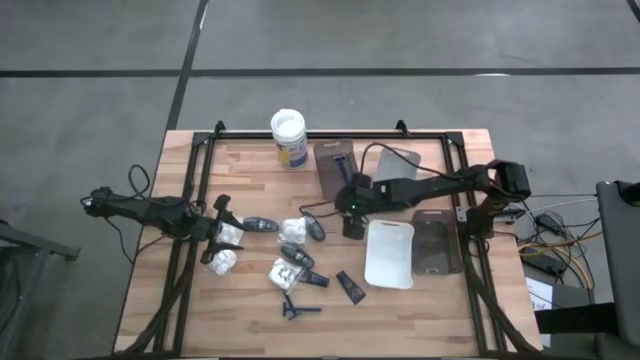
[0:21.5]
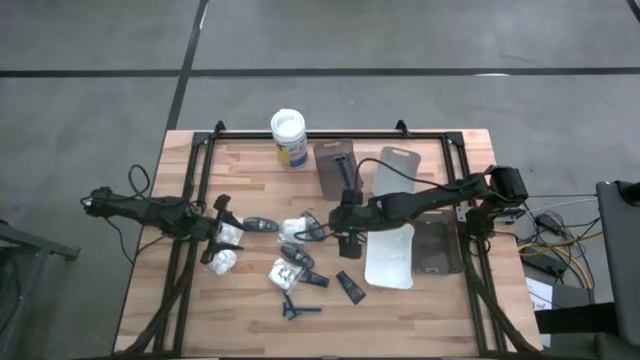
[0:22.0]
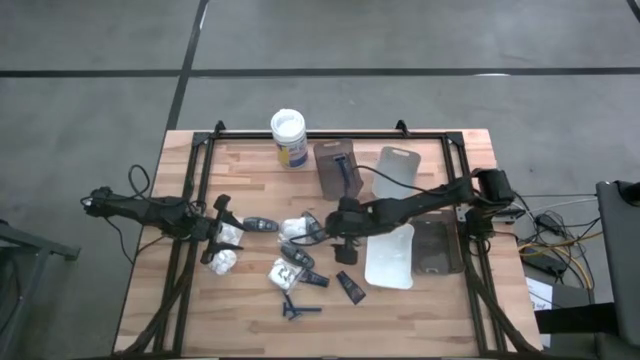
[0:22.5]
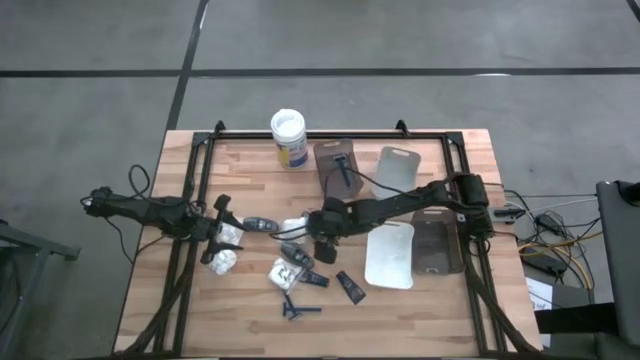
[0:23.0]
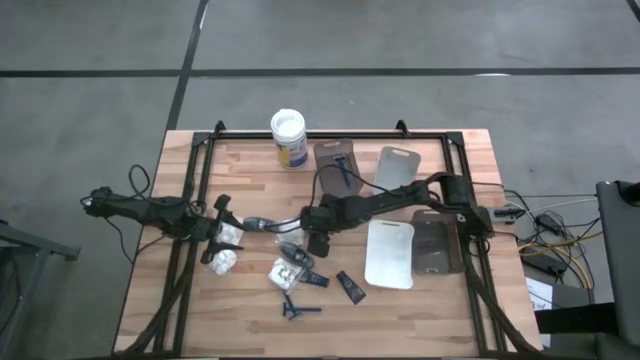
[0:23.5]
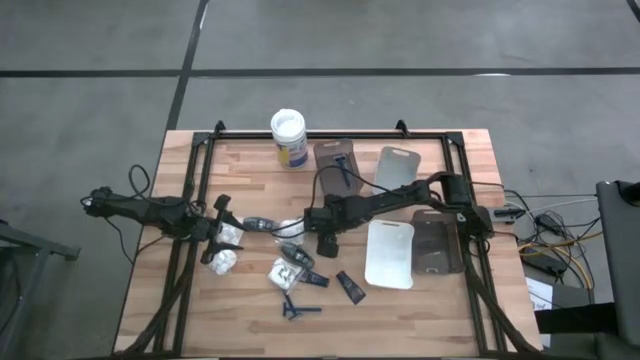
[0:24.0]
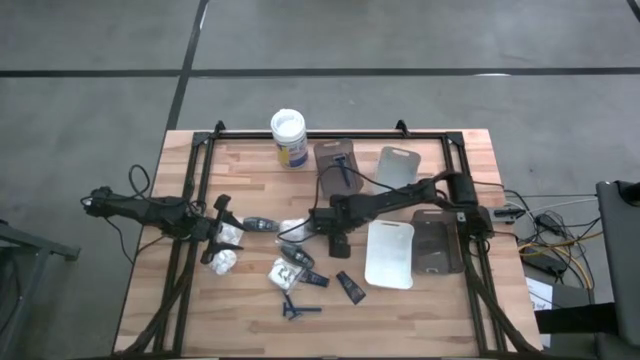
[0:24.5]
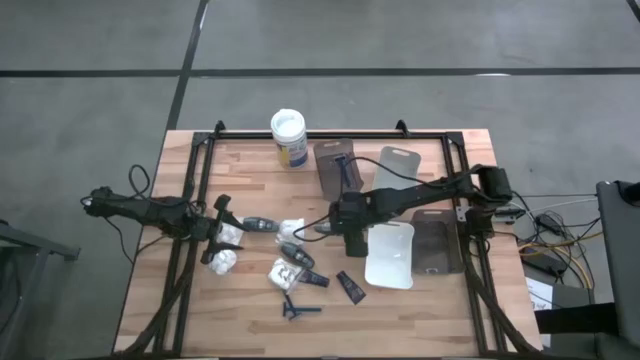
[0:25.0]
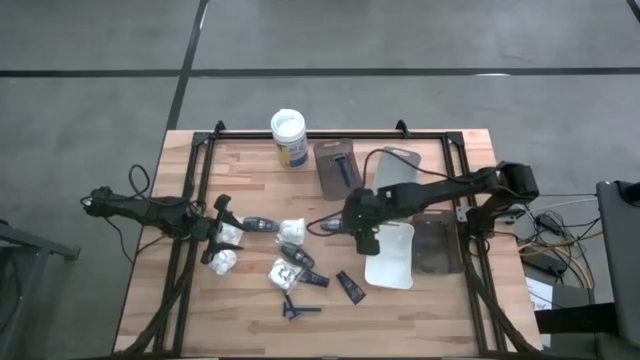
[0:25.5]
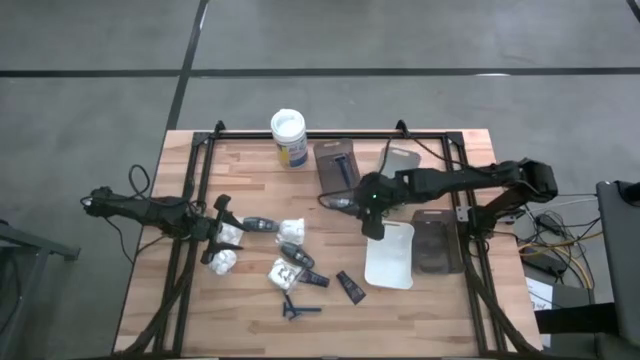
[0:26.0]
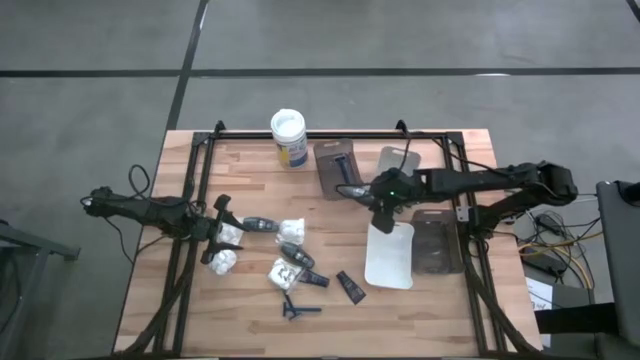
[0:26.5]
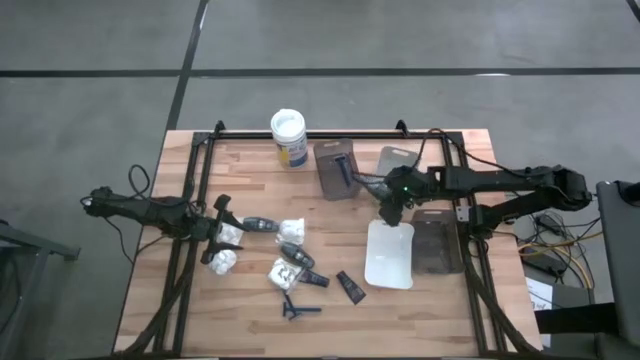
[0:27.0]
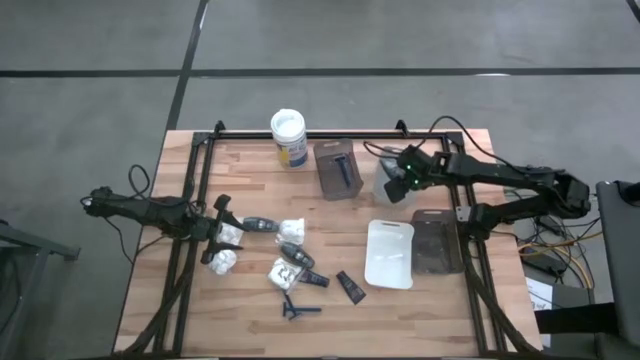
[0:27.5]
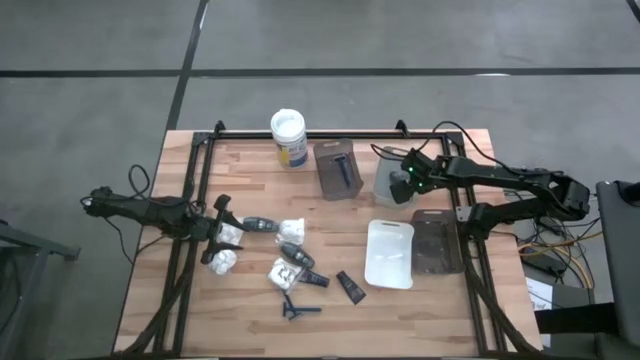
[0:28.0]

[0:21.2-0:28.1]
Task: Pick & Place Travel size toiletries
Put the gray deodorant into the gray bin

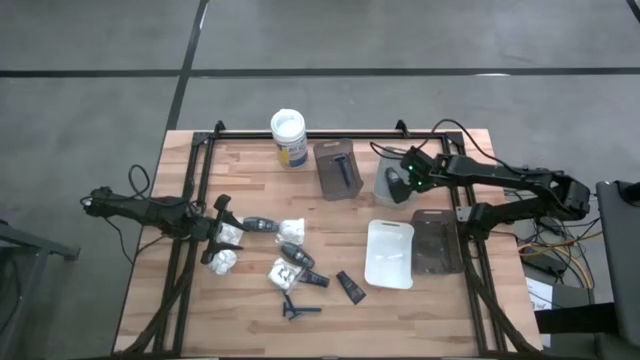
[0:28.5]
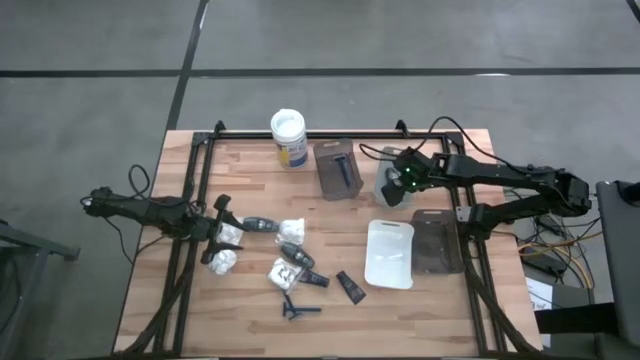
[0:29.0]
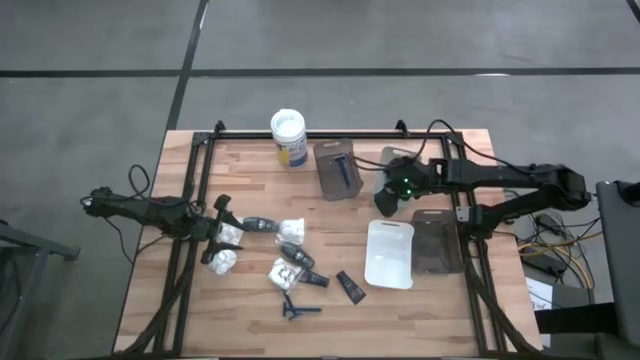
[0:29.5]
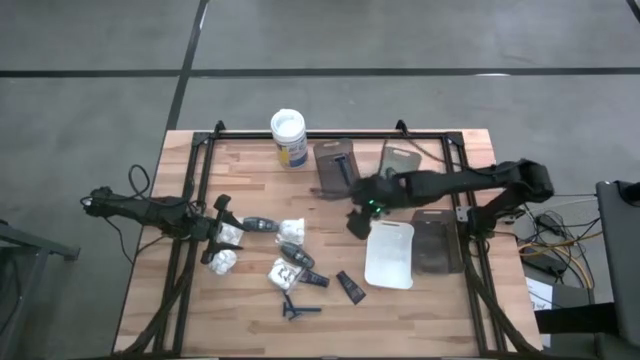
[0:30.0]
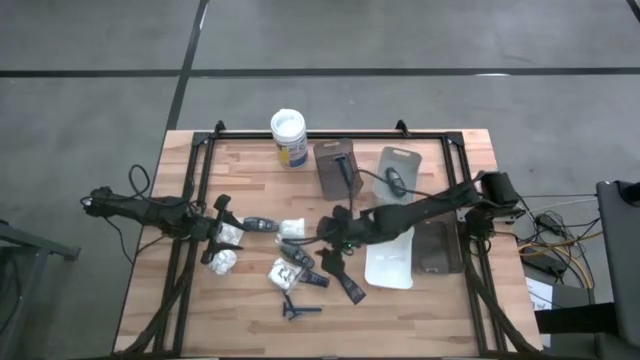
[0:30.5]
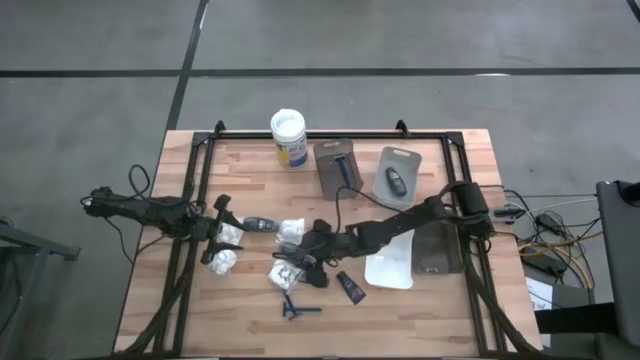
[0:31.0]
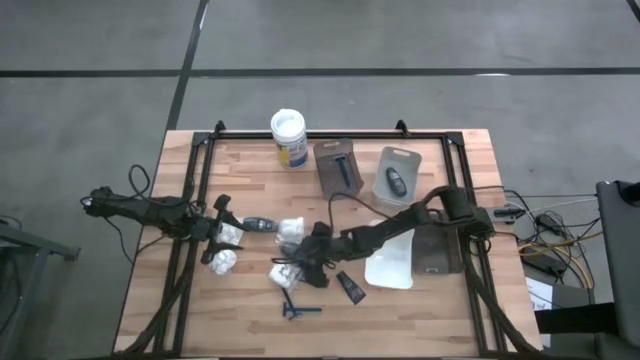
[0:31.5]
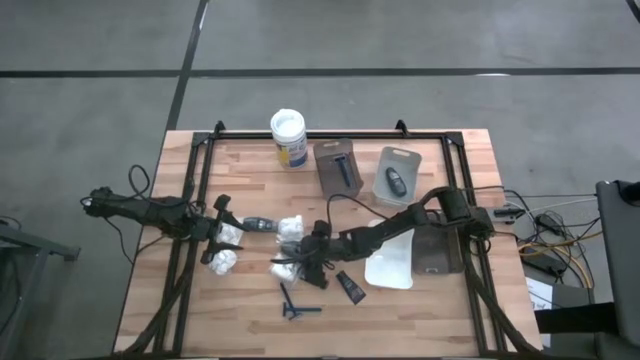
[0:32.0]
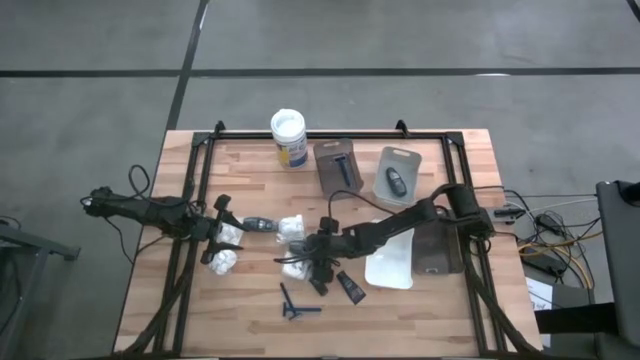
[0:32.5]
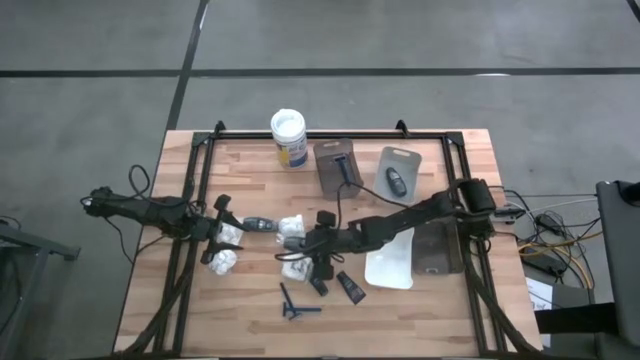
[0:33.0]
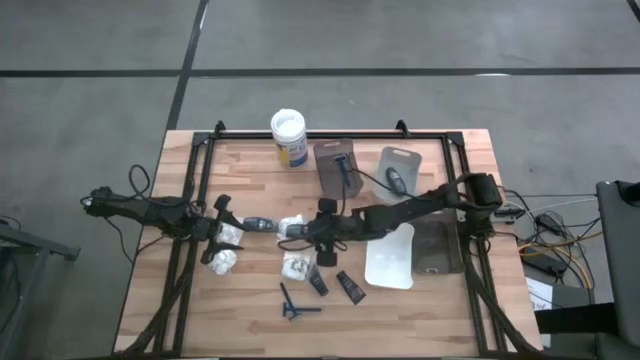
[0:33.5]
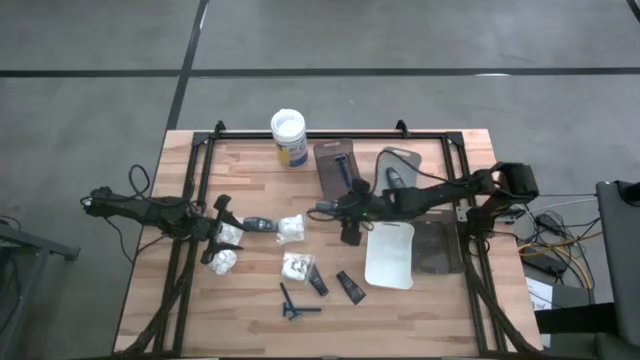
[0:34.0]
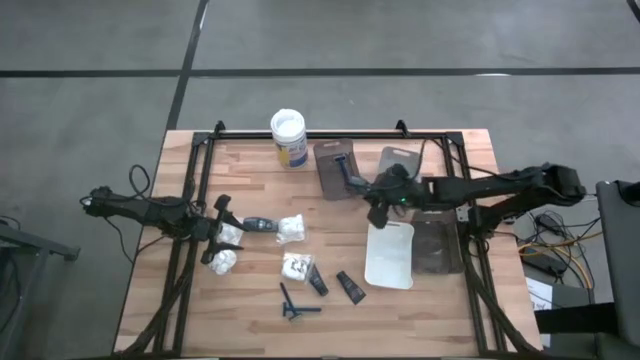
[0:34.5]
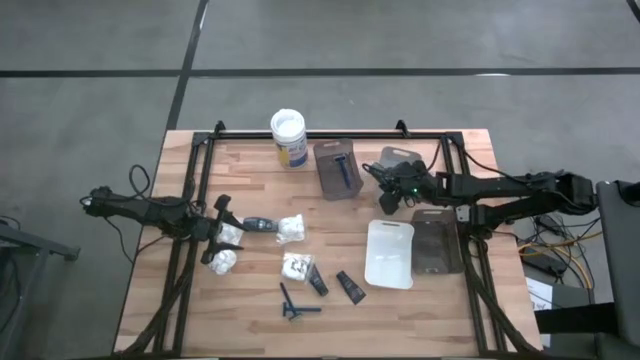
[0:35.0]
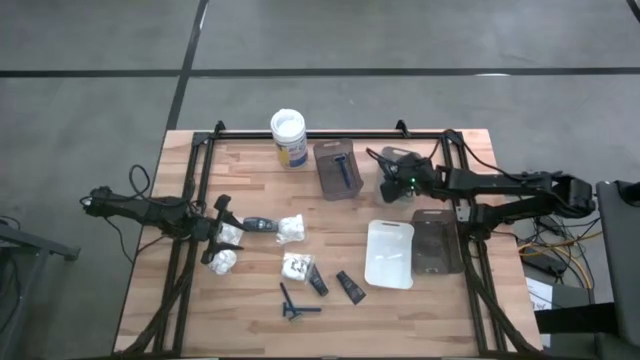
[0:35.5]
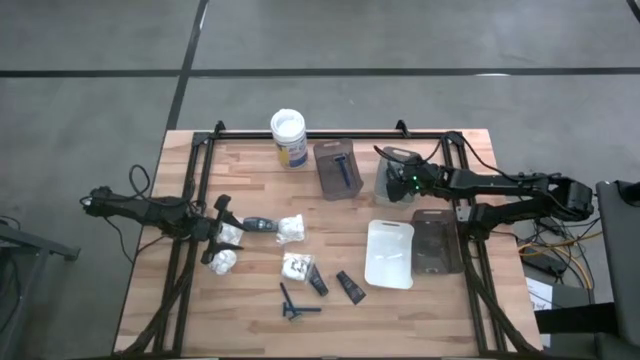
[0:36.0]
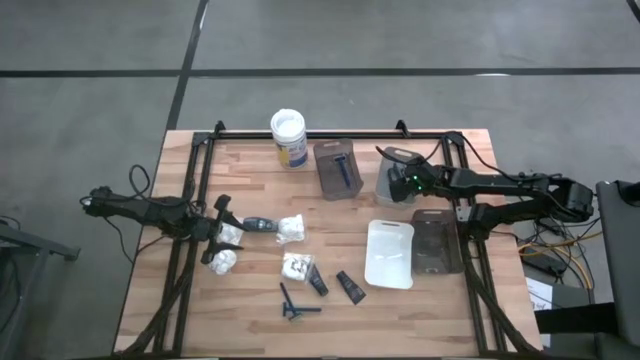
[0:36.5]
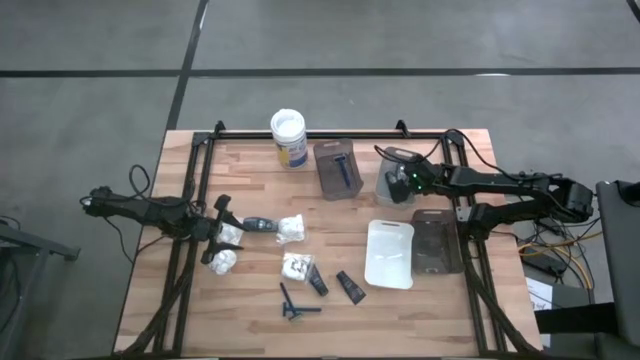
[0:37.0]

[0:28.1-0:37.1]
Put the gray deodorant into the gray bin

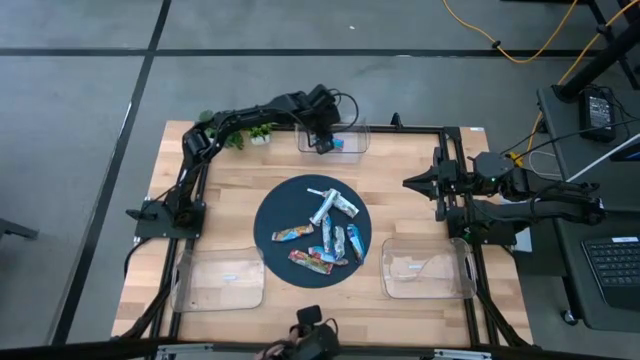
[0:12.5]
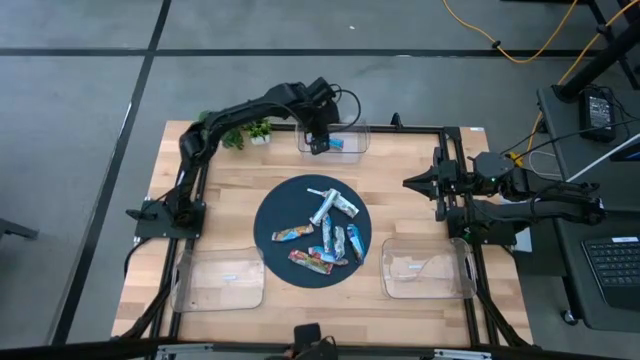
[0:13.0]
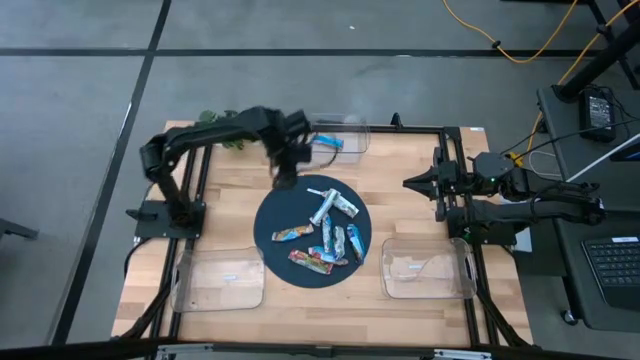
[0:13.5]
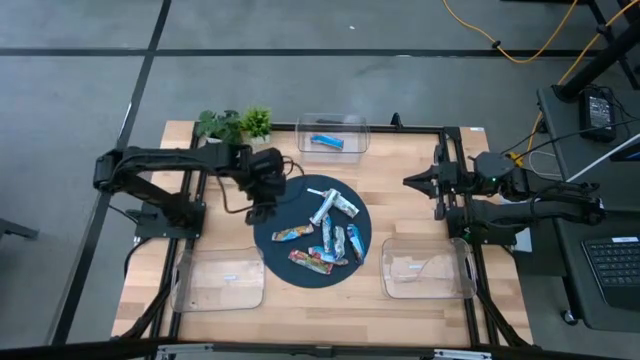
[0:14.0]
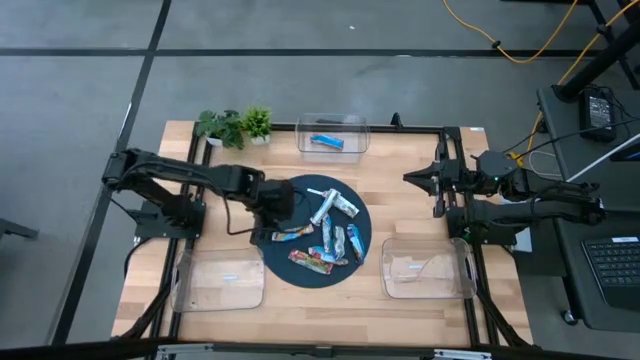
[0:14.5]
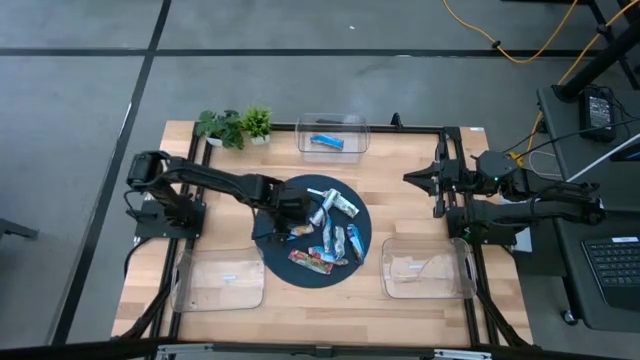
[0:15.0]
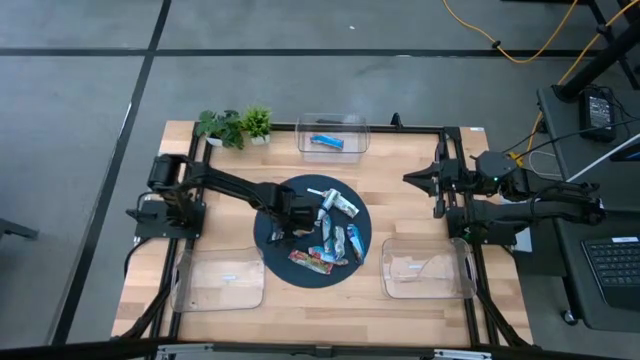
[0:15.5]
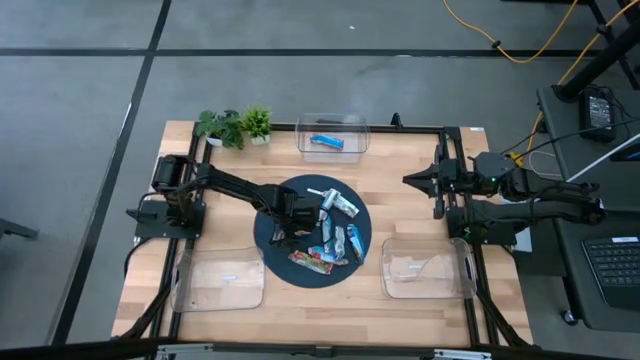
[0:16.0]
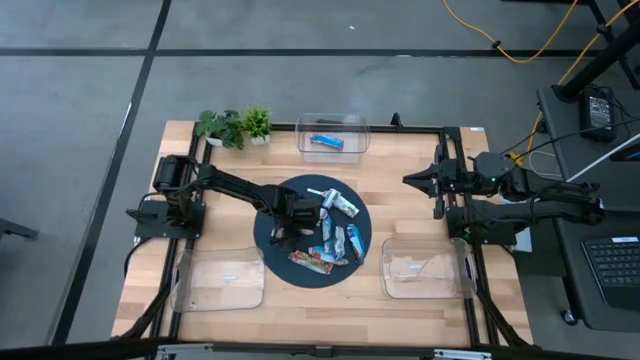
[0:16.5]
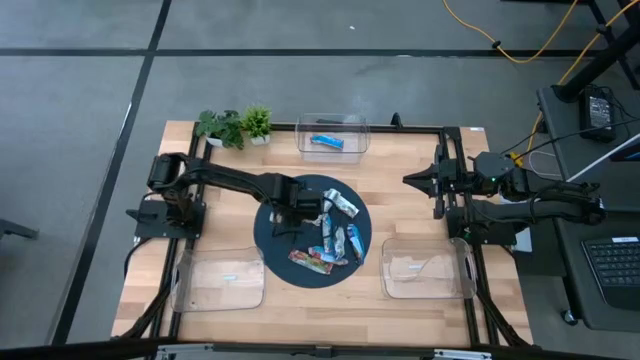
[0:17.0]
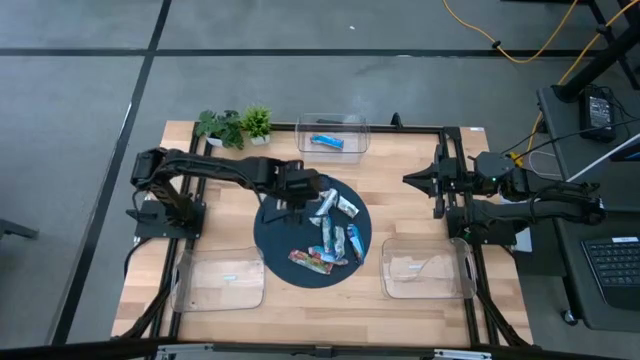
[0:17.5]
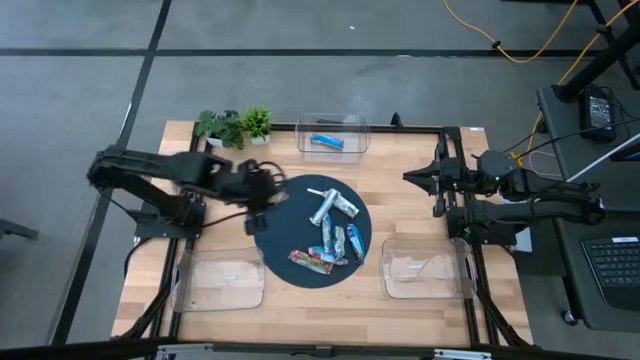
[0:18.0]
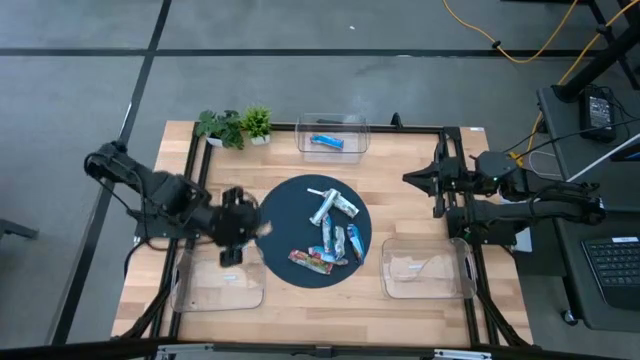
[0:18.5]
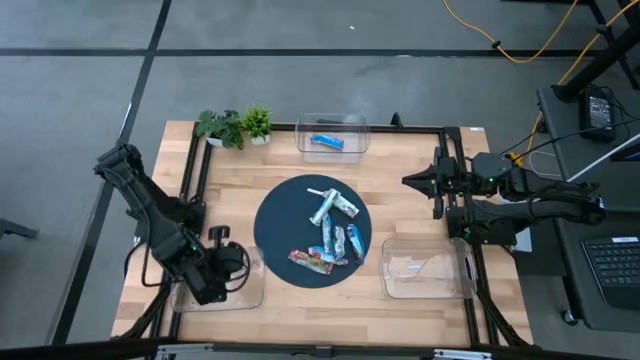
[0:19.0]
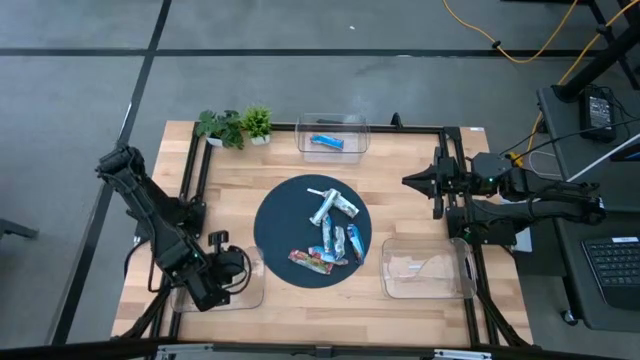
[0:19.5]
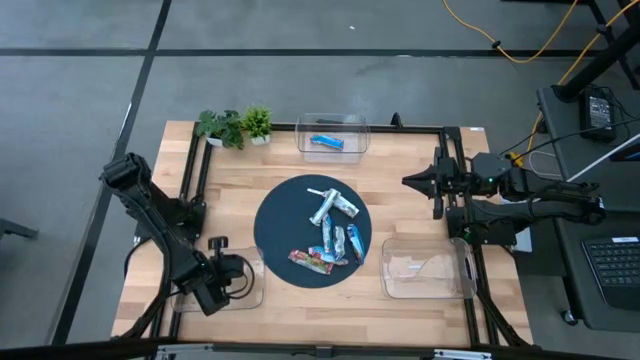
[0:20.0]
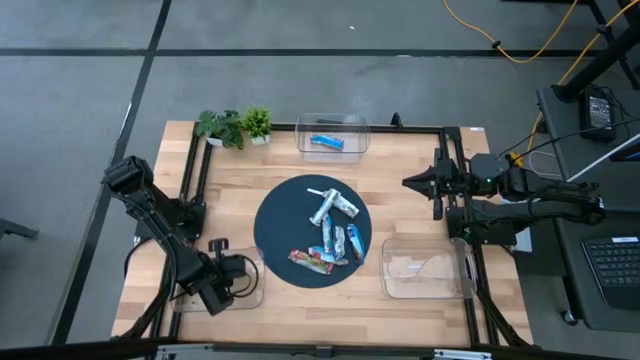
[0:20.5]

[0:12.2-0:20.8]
Task: Pick and place Granola Bars by type
Put the orange granola bar into the bottom left transparent bin
